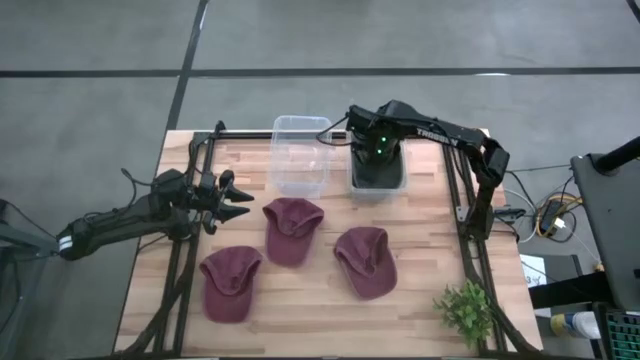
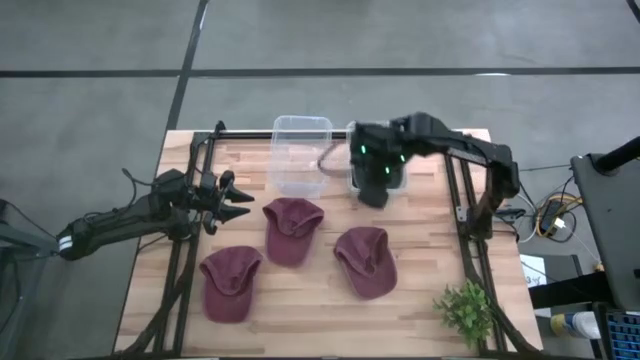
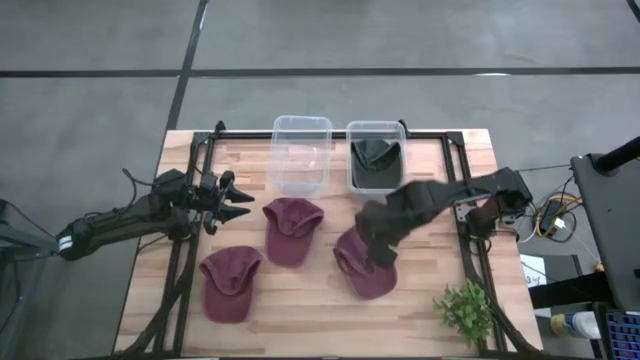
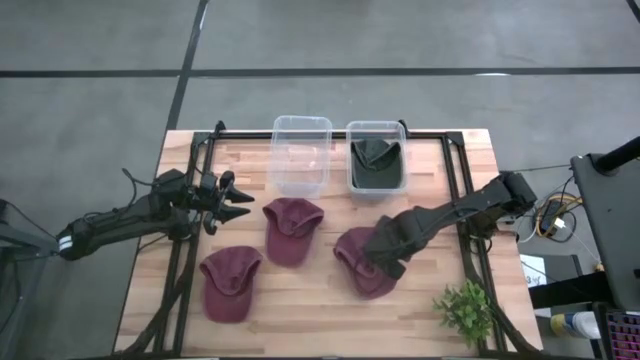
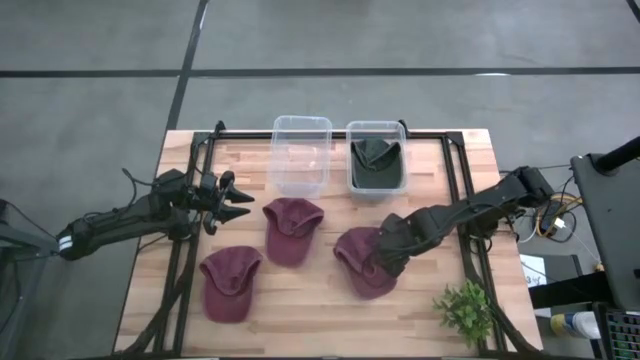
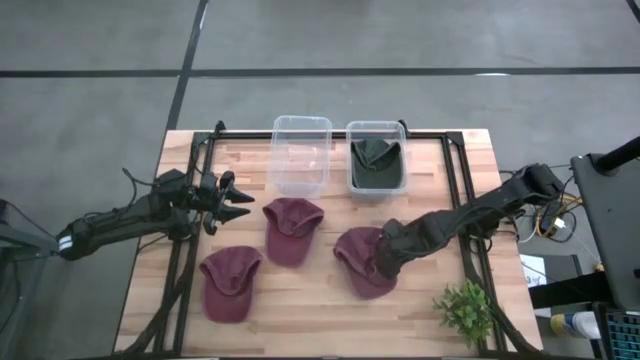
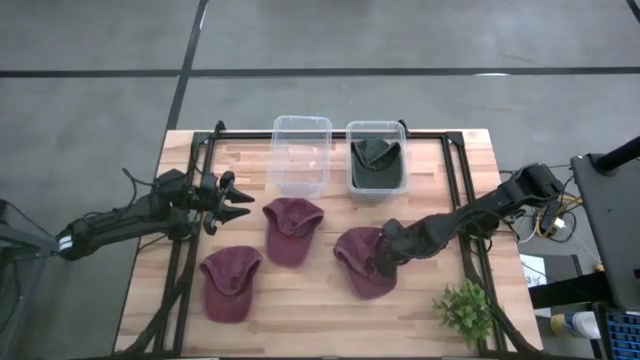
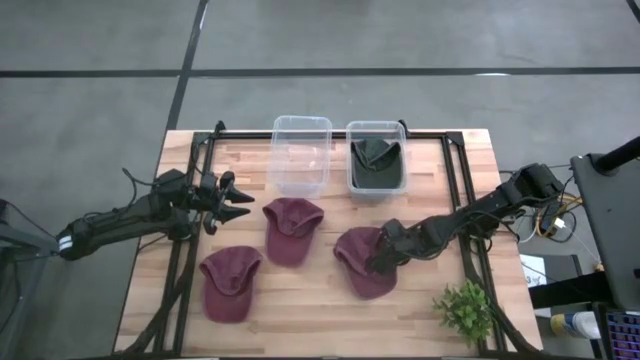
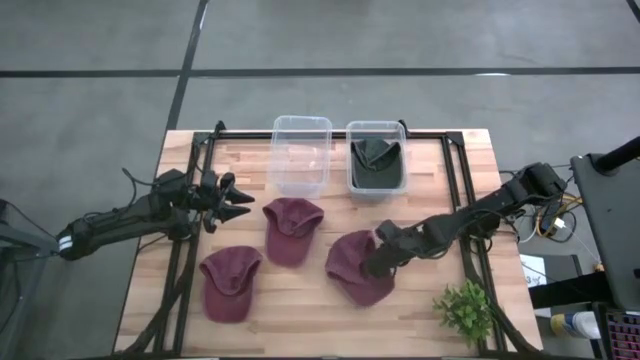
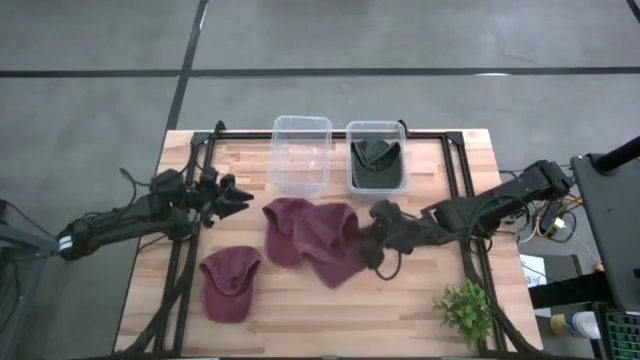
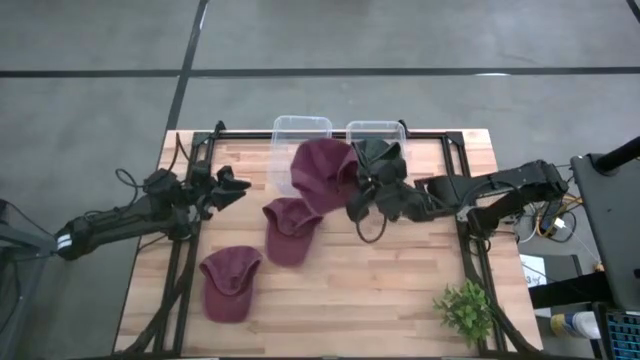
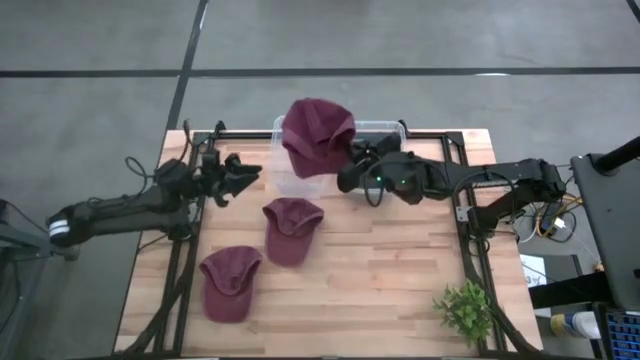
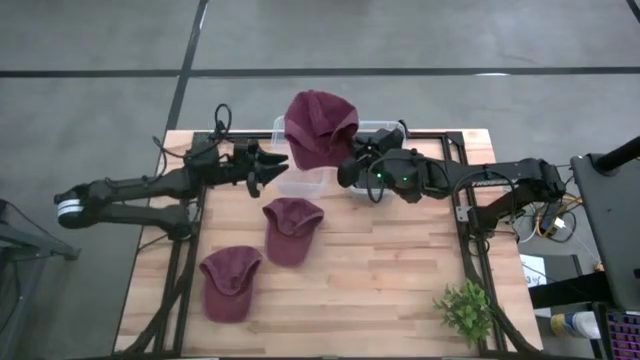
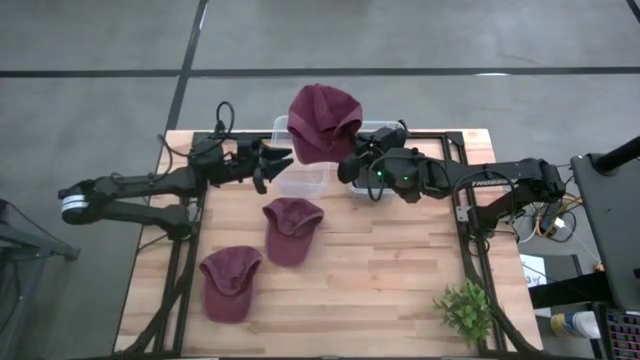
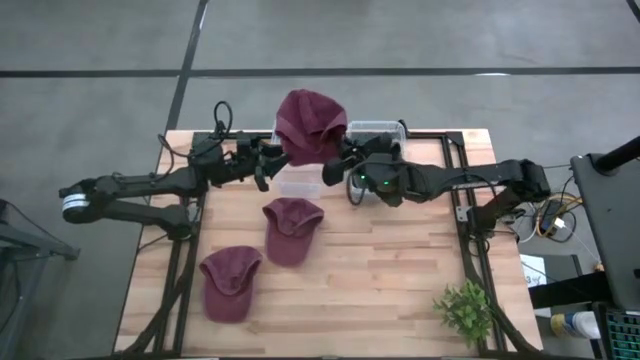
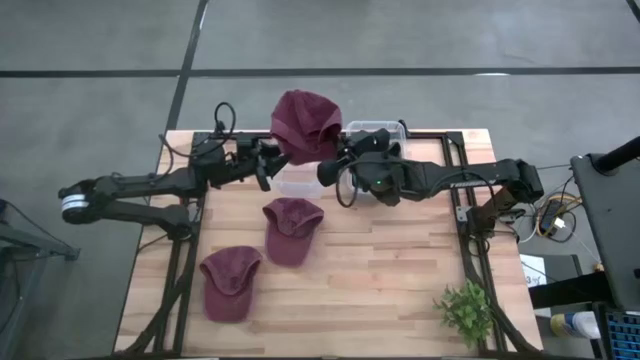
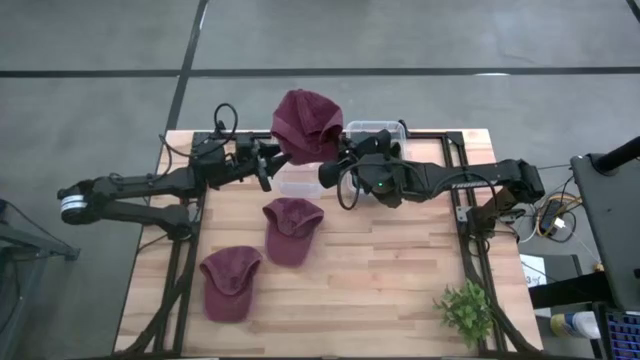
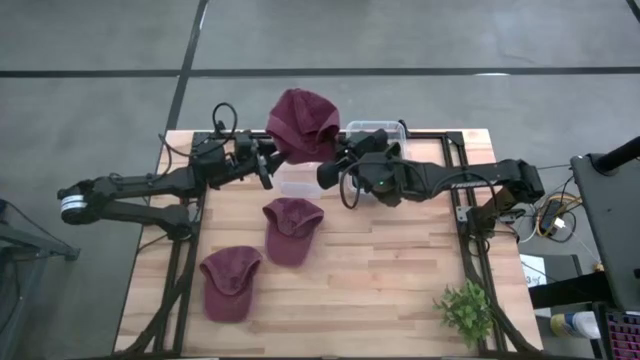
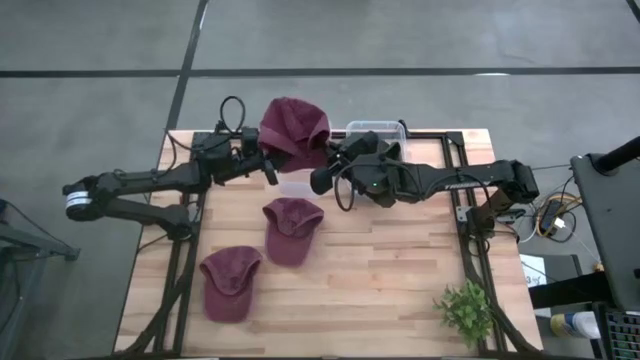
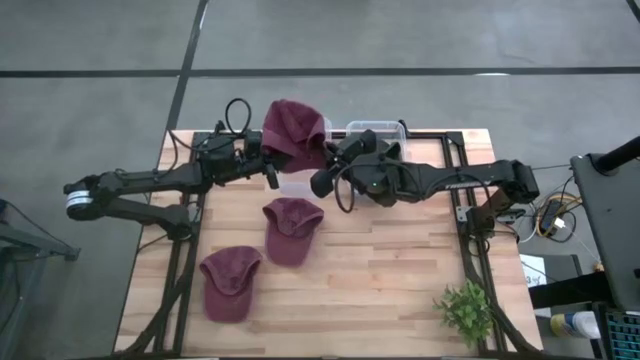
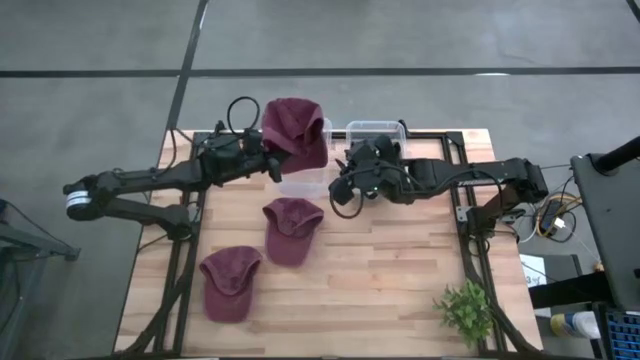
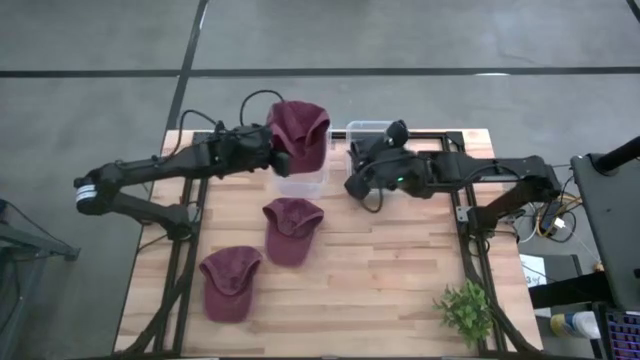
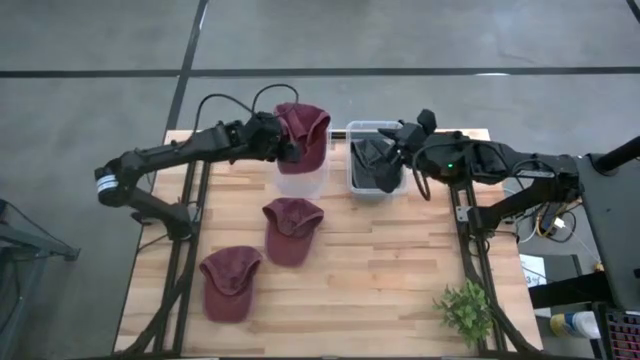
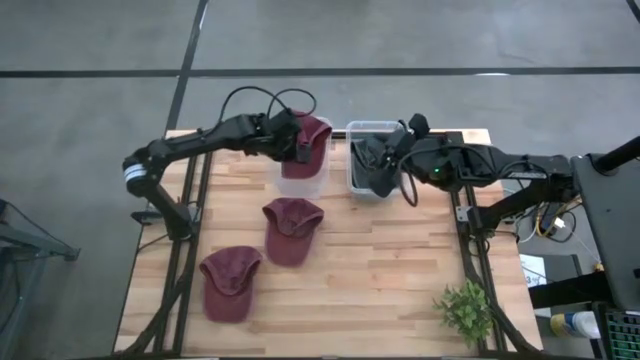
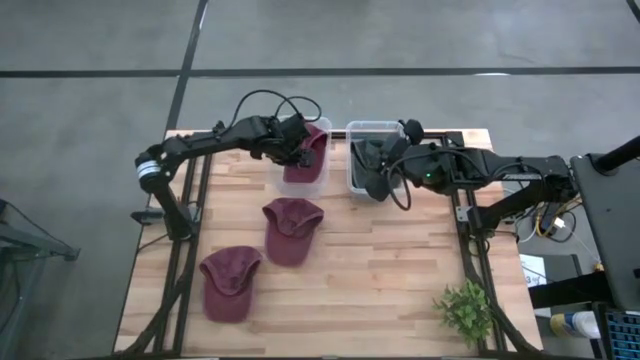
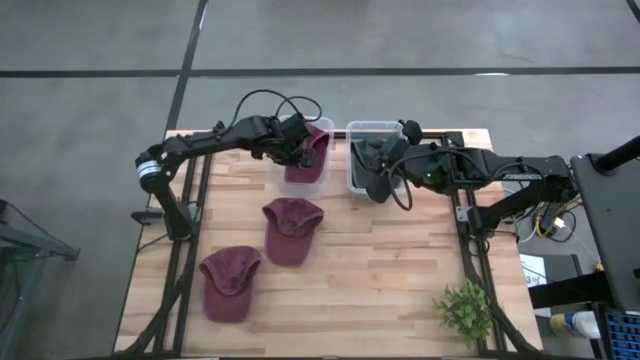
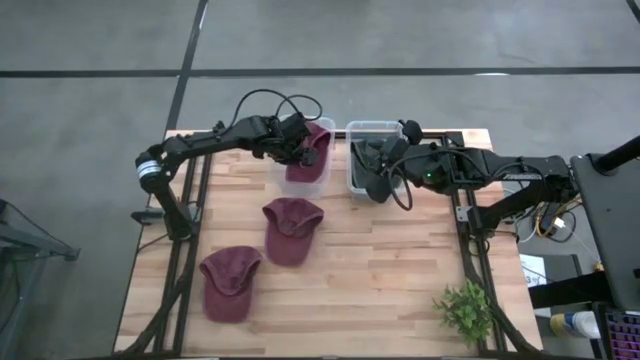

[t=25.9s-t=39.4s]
Task: Pick & Place hat
Put the right red cap into the left transparent bin

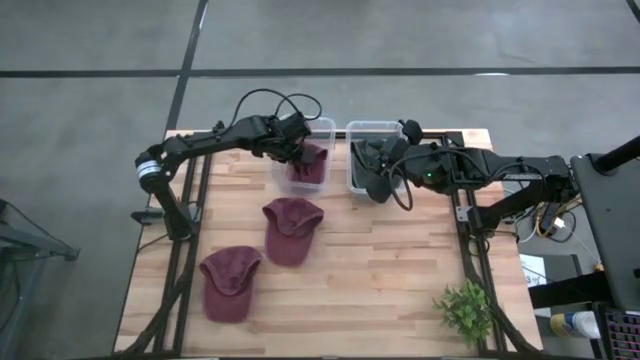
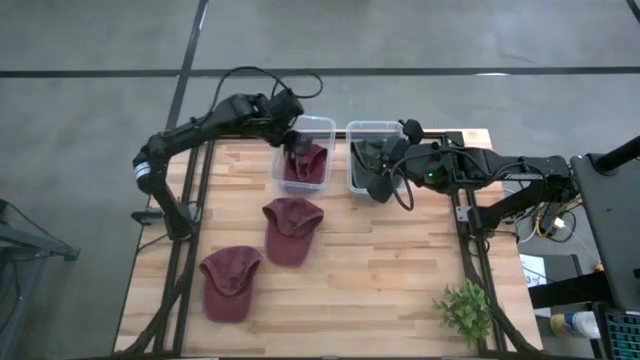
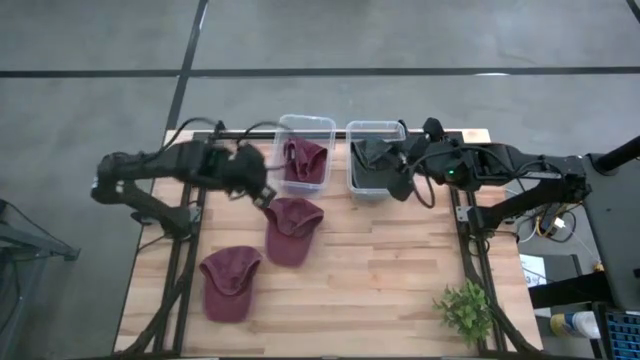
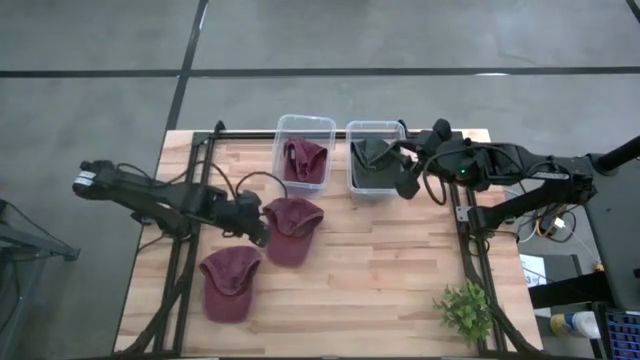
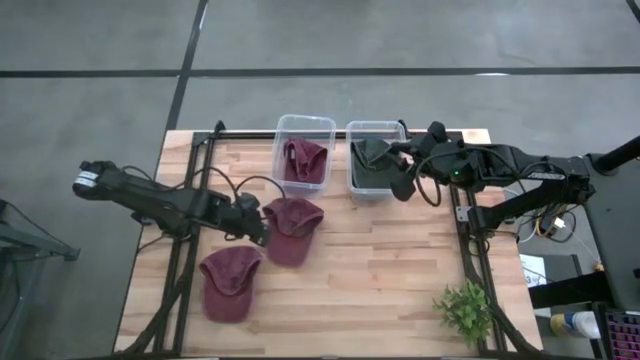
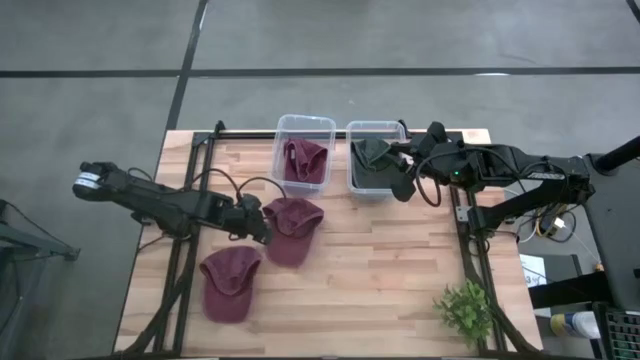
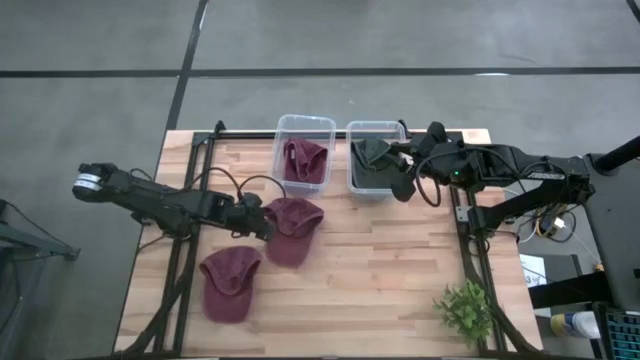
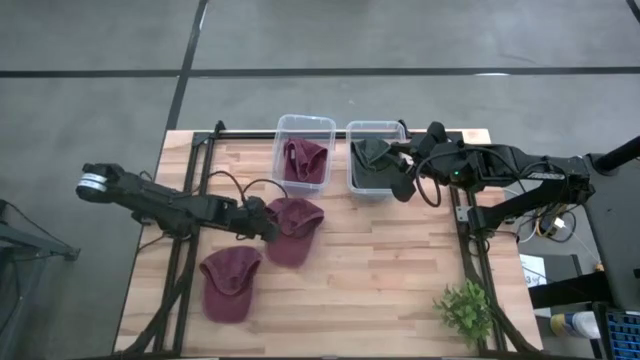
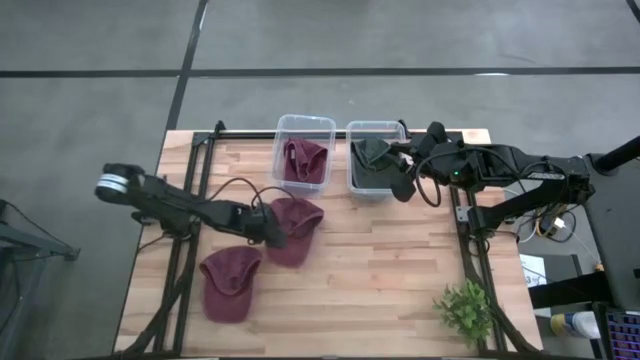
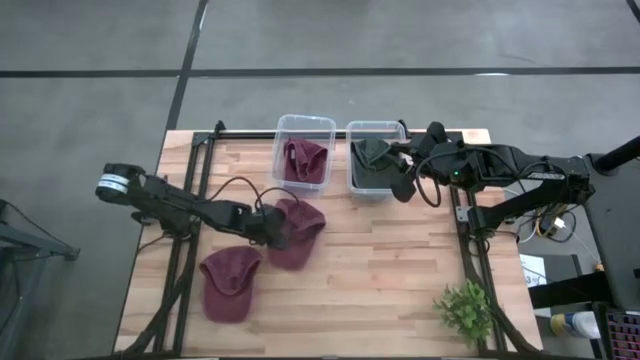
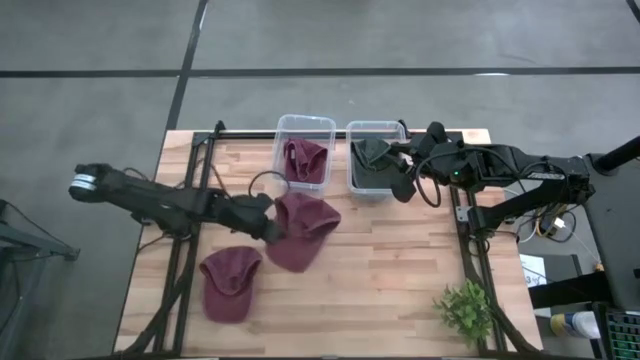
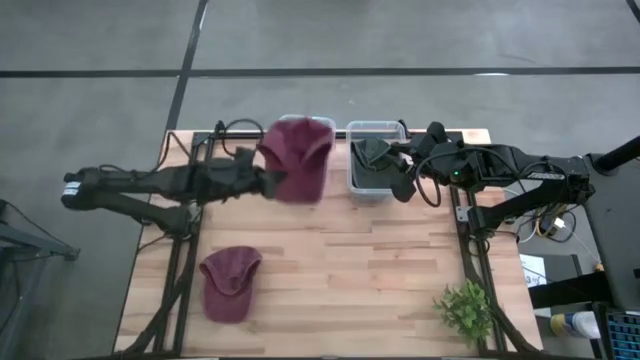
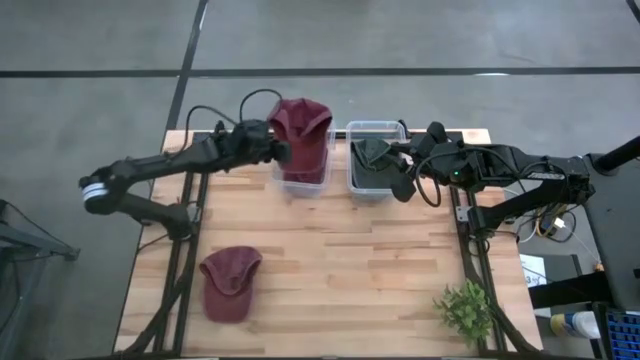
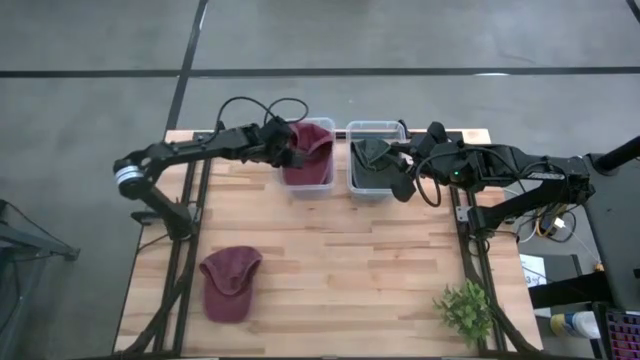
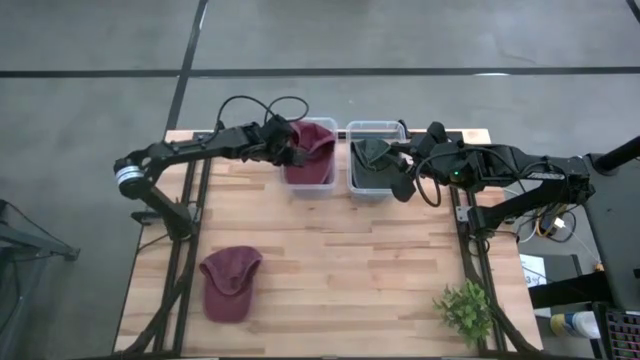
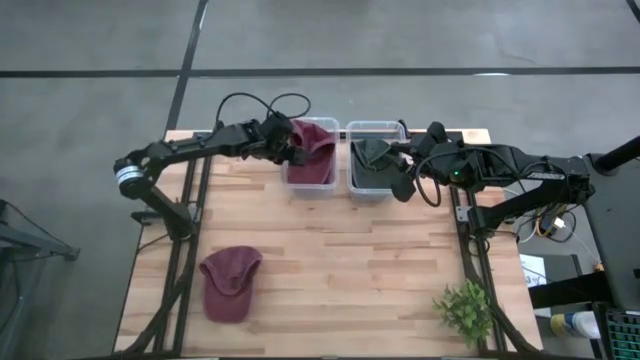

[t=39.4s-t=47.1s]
Put the top red cap into the left transparent bin
